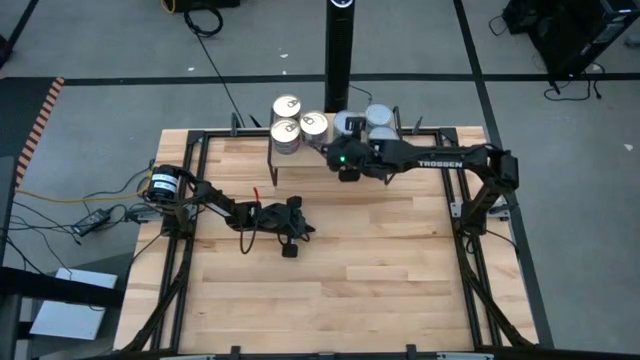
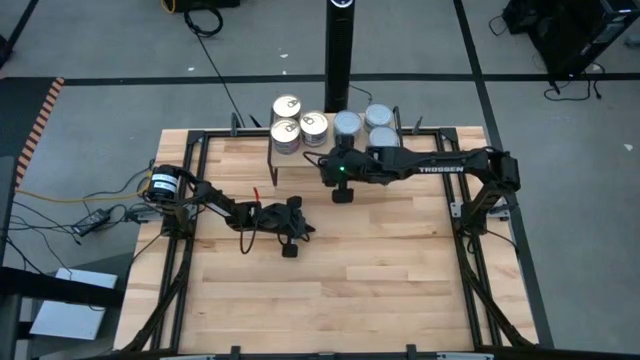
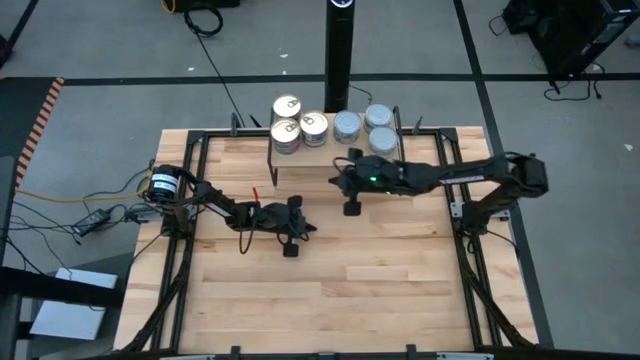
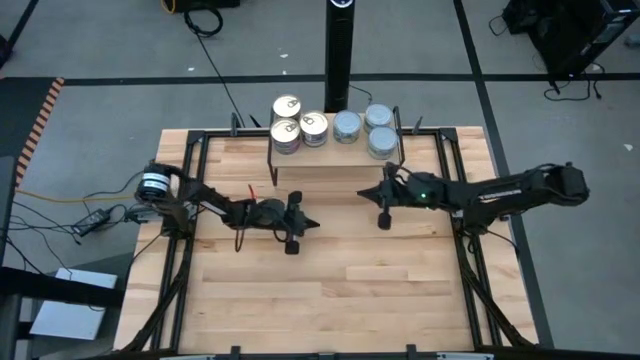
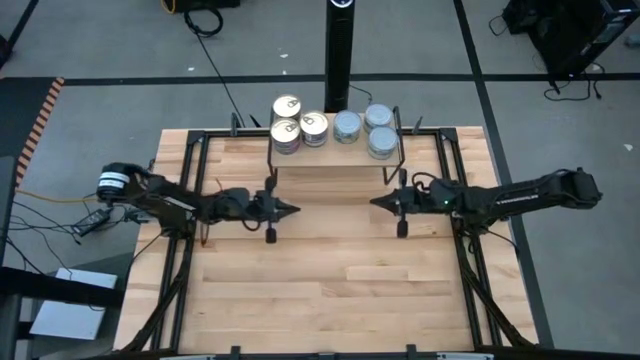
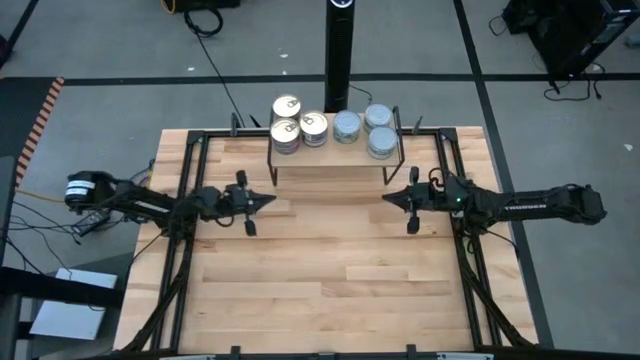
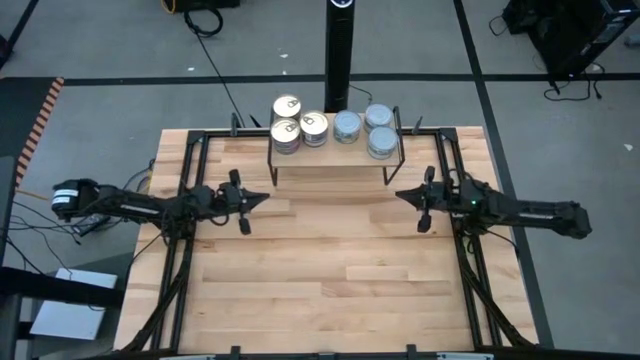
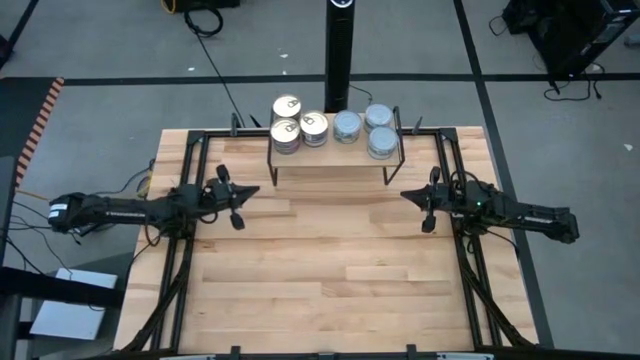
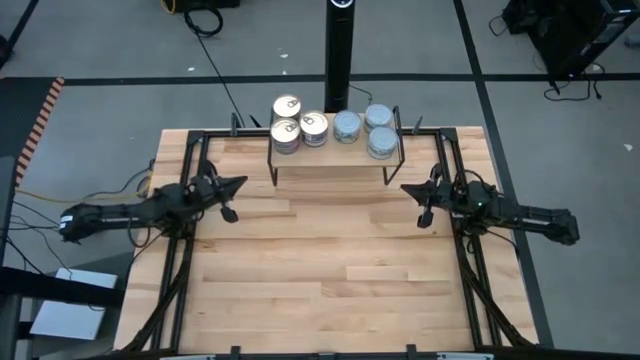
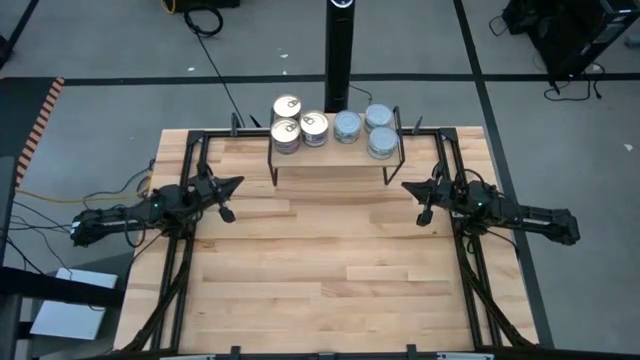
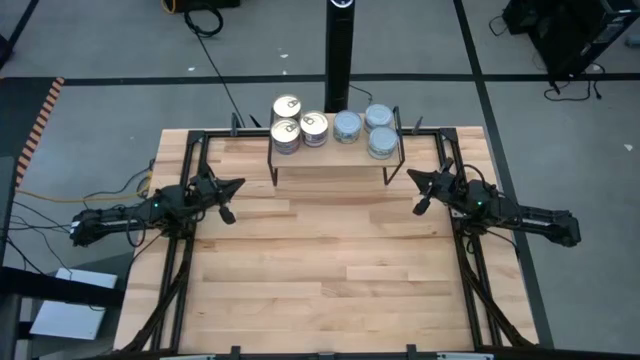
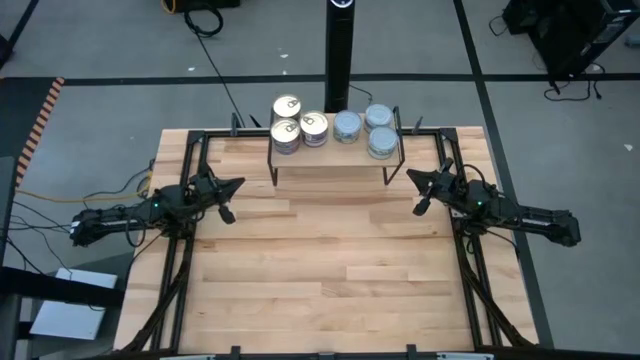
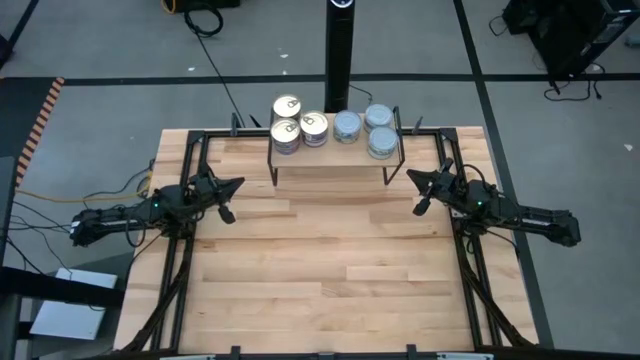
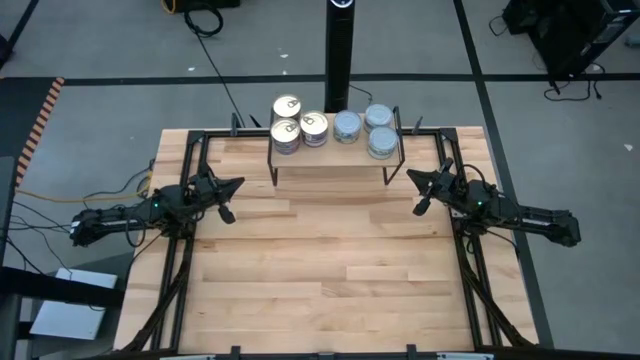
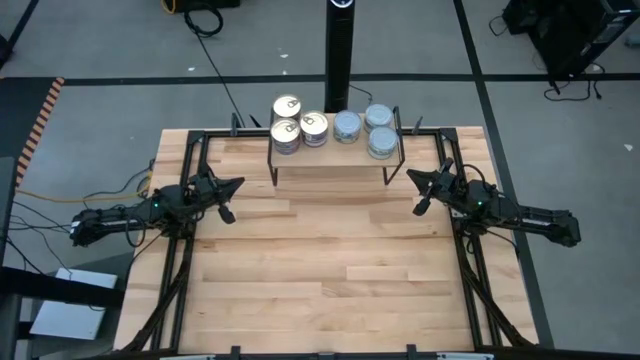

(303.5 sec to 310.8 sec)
Task: Stack canned seafood by type on shelf
Return to Home Position

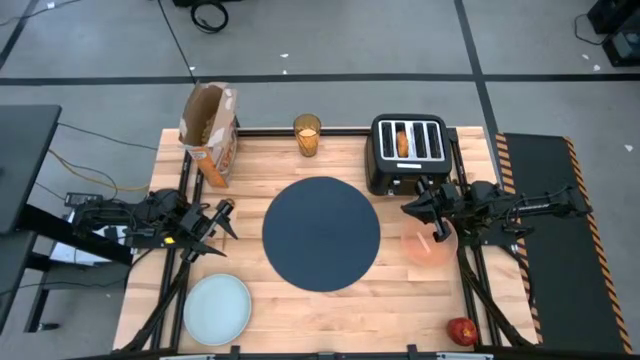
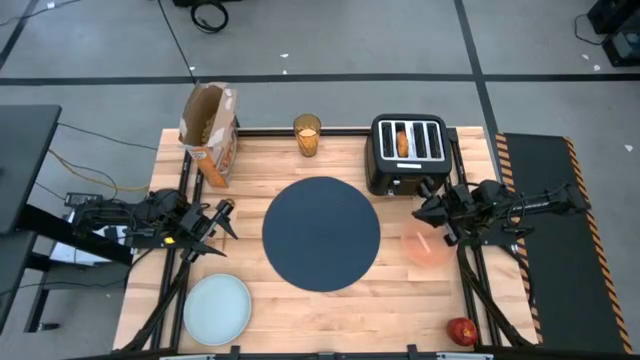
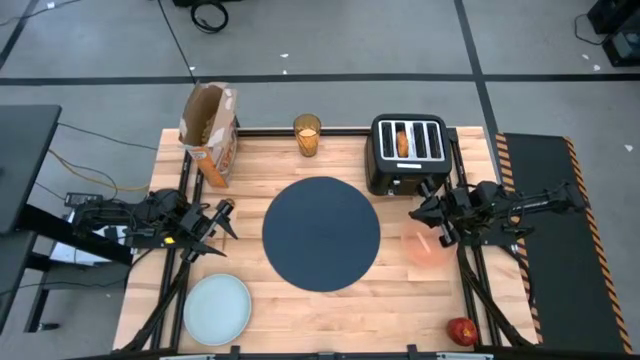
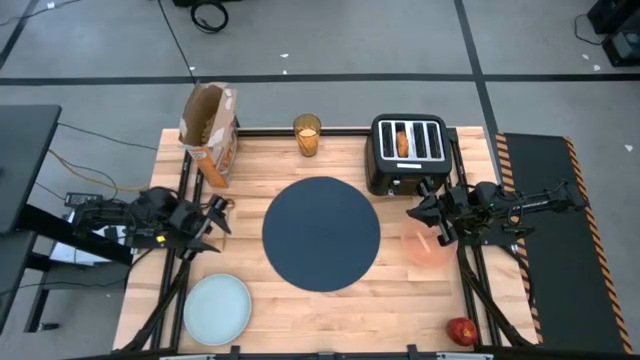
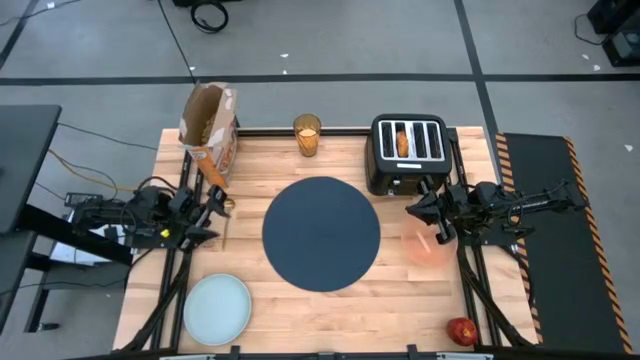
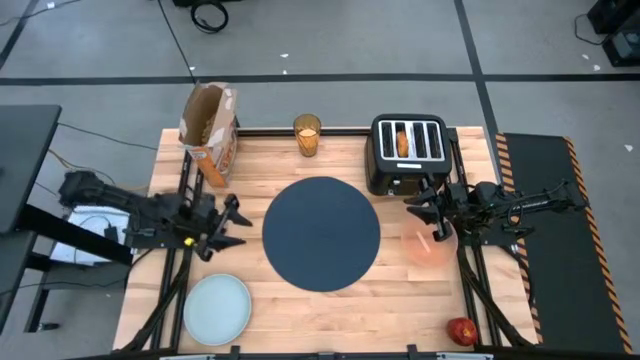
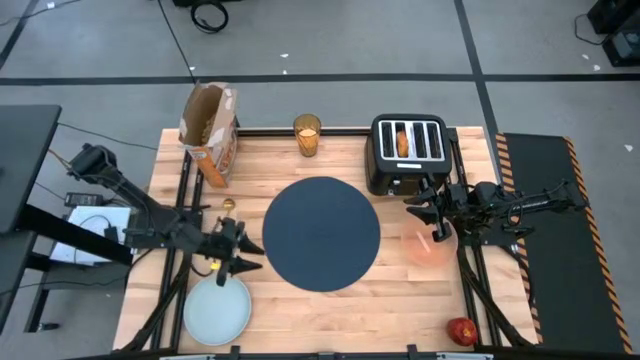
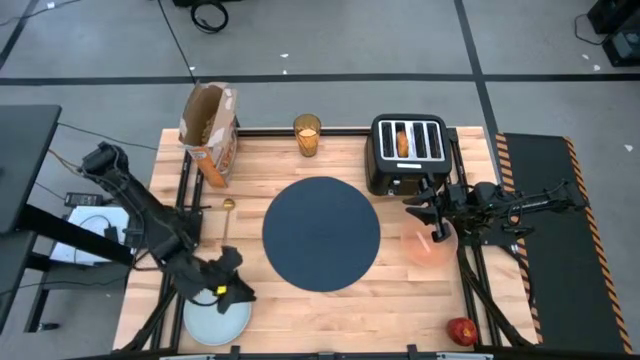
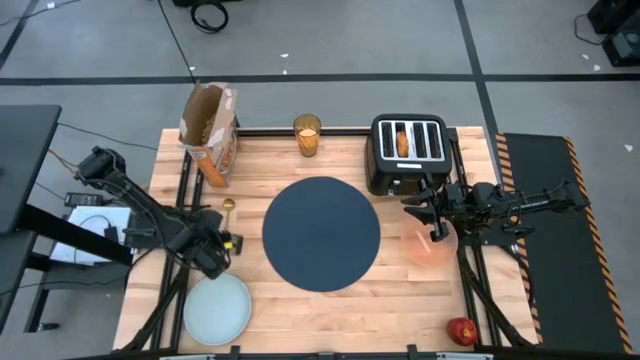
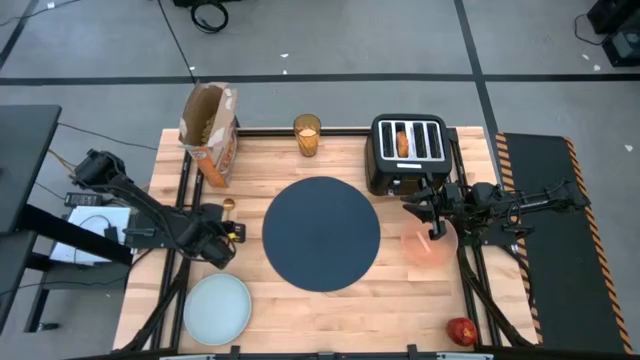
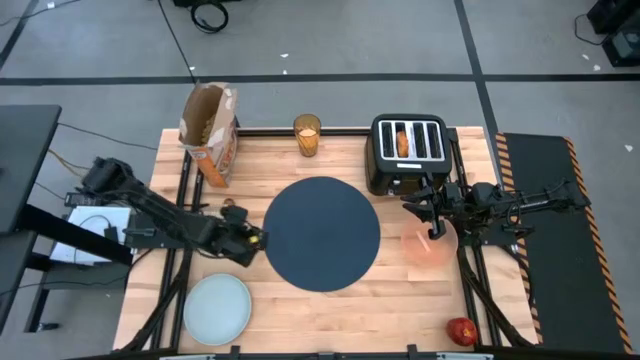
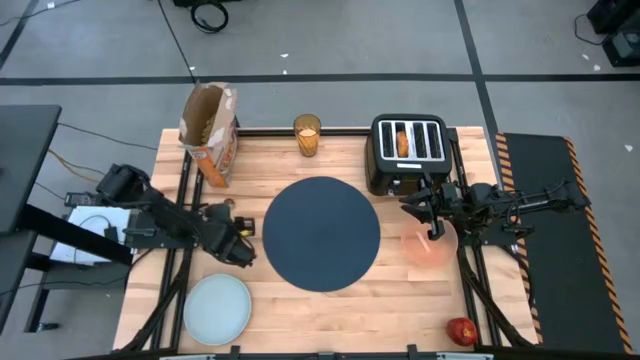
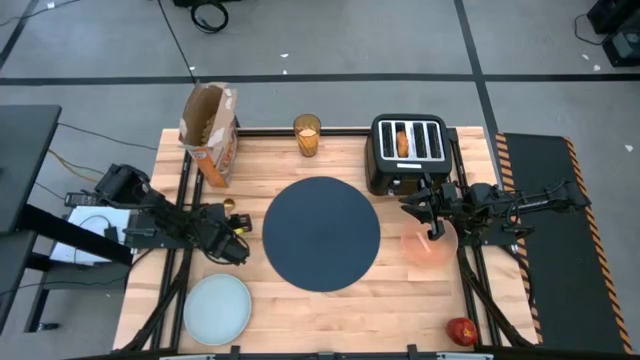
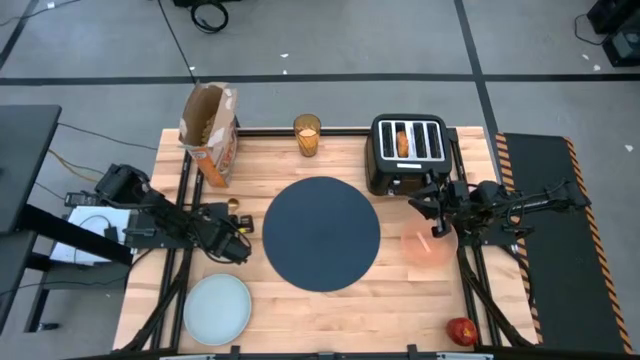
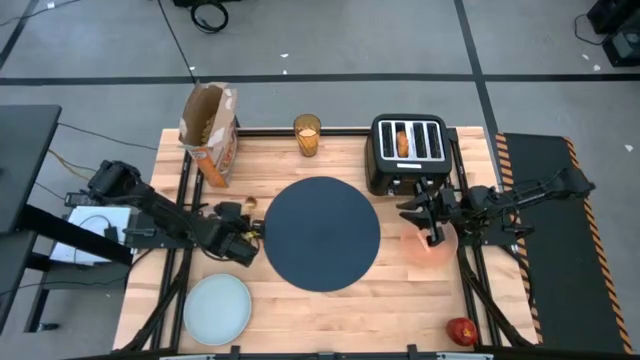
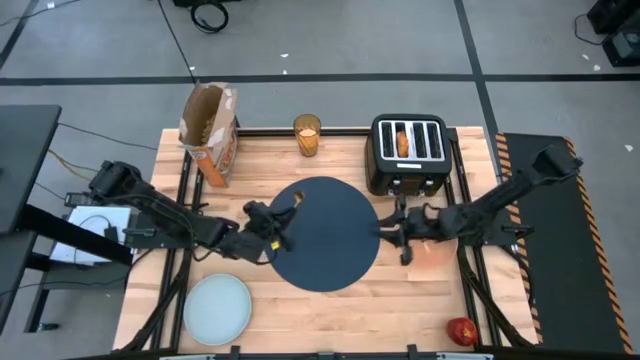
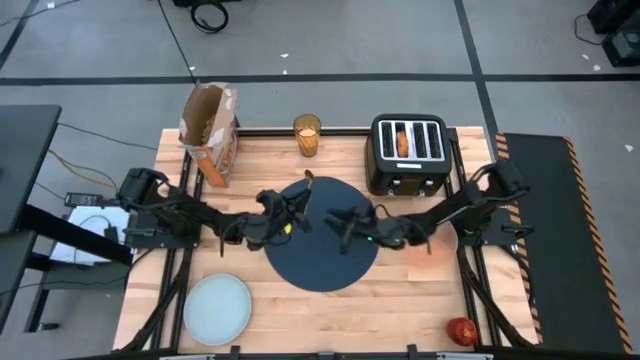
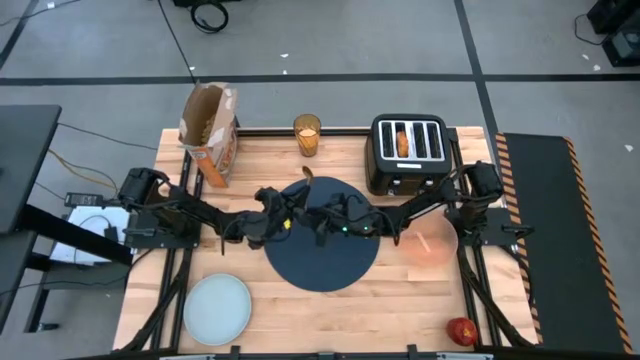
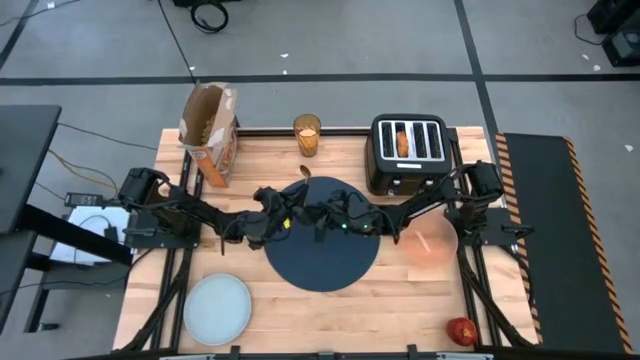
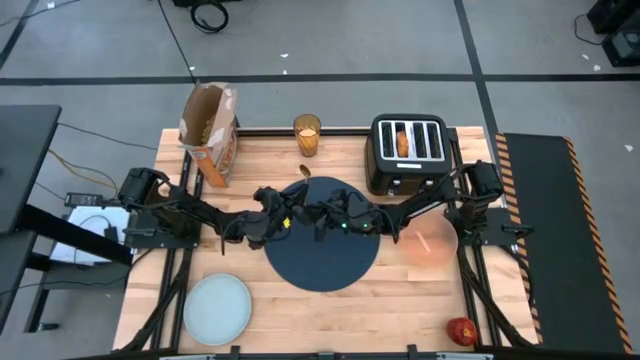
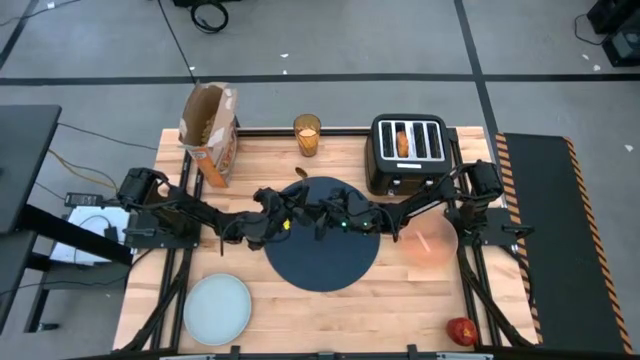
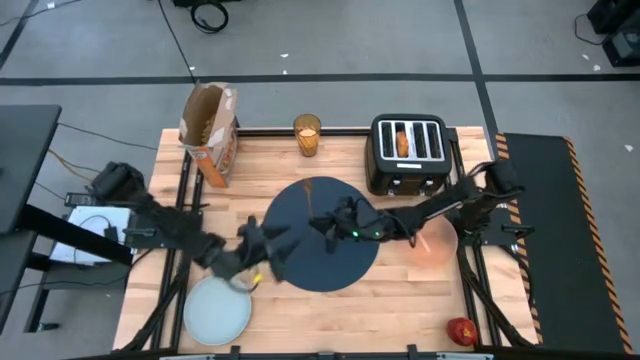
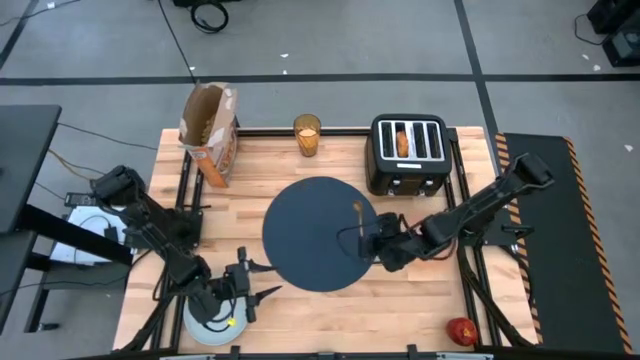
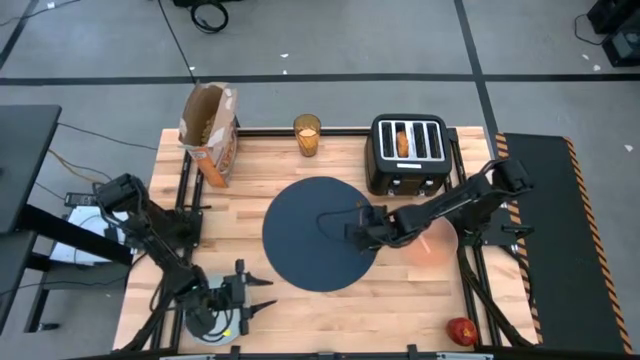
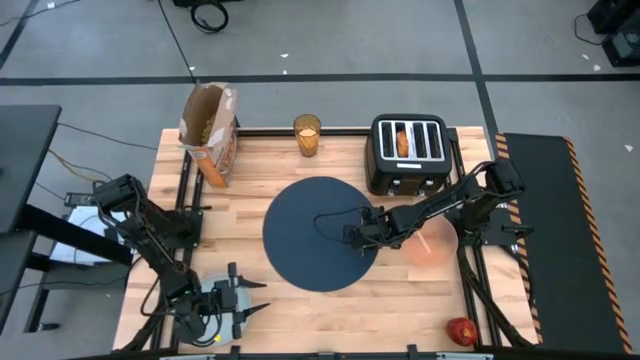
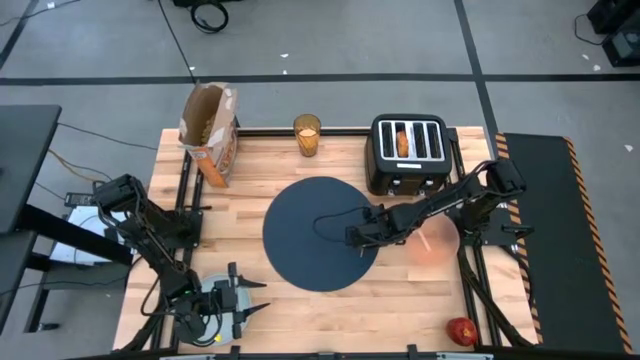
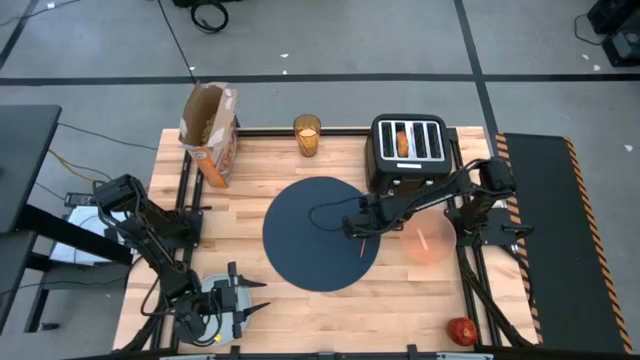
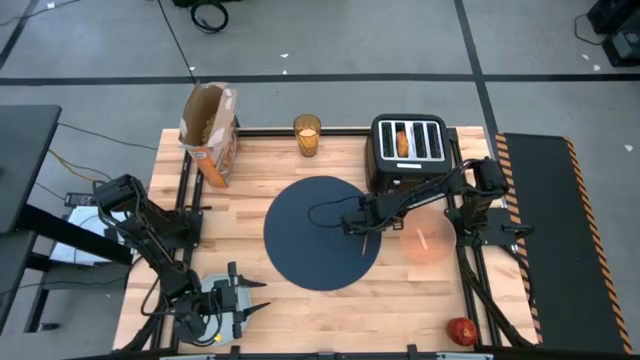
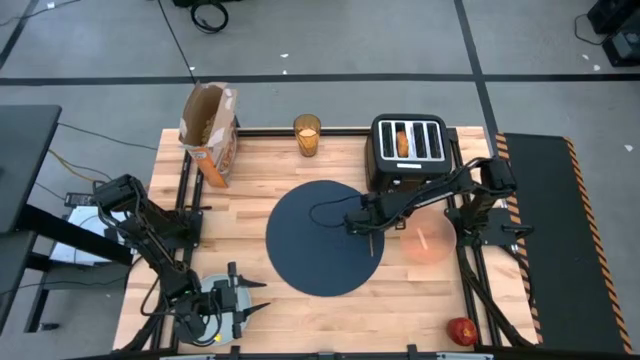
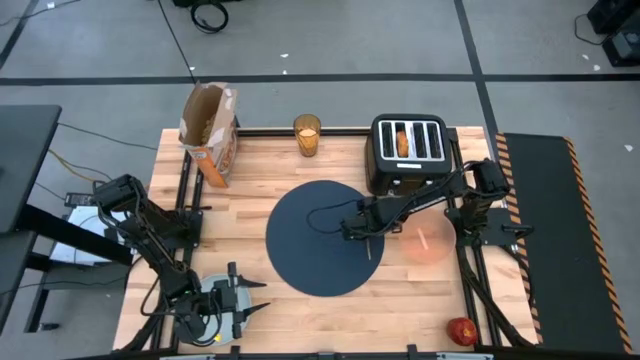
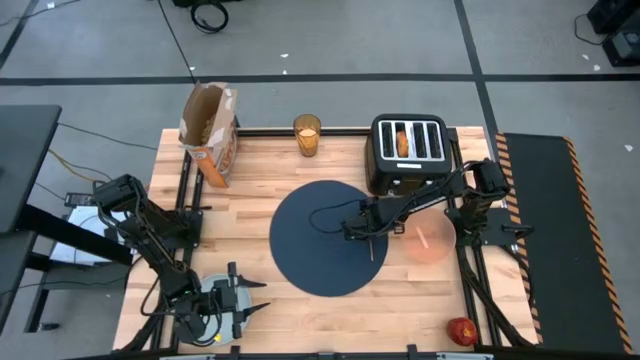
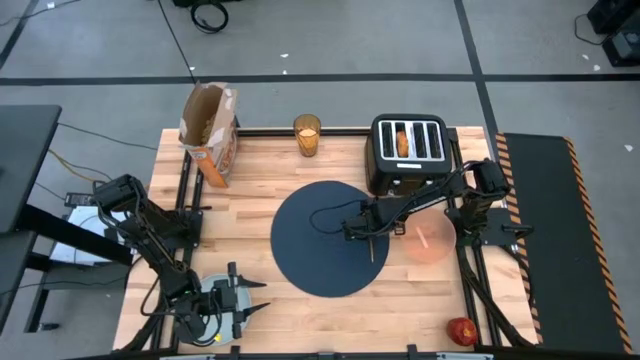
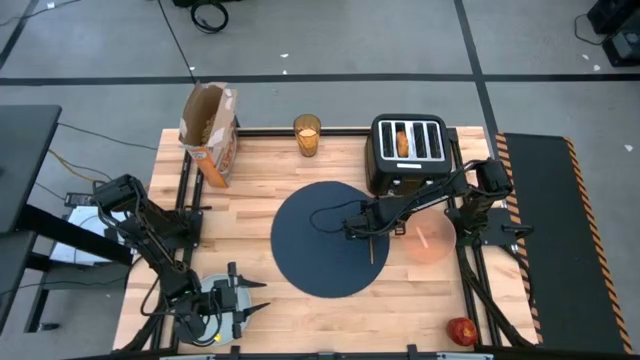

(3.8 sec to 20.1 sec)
Task: Arrange a breakfast setting
Put the spoon on the right side of the placemat
